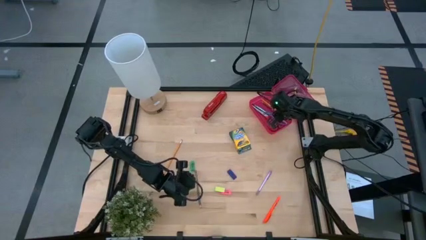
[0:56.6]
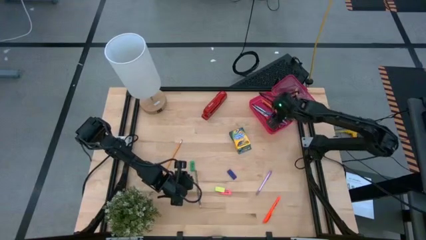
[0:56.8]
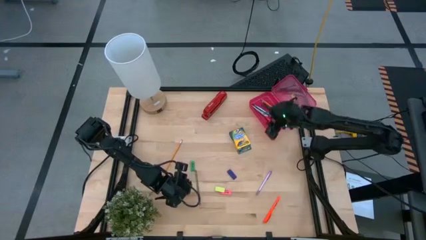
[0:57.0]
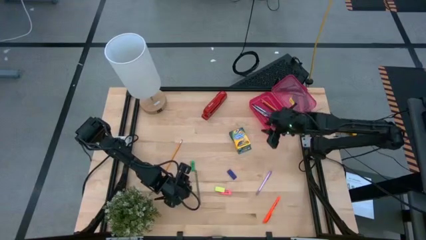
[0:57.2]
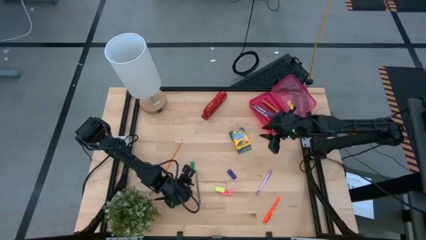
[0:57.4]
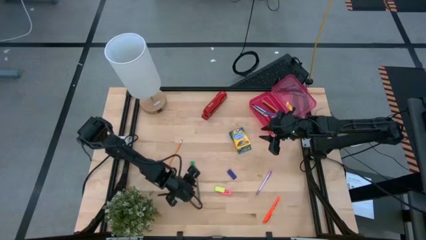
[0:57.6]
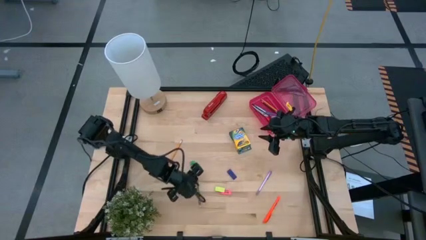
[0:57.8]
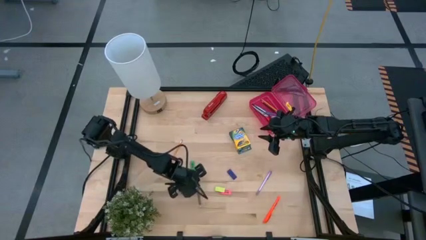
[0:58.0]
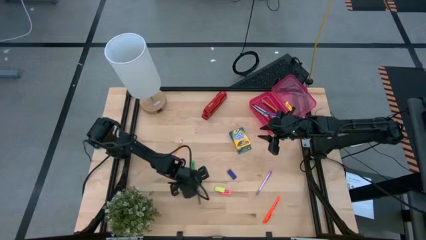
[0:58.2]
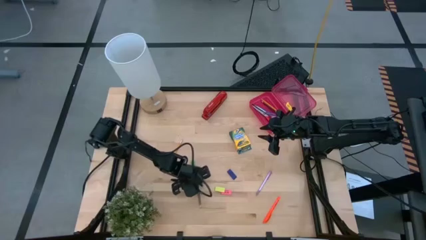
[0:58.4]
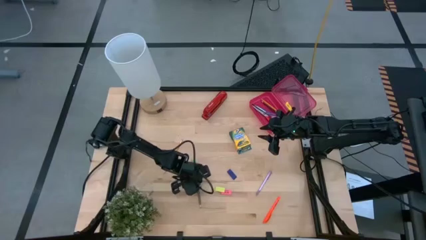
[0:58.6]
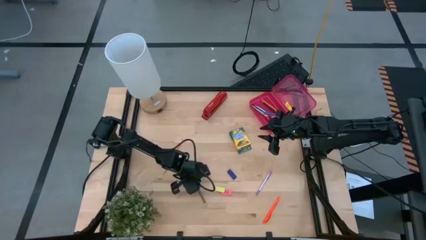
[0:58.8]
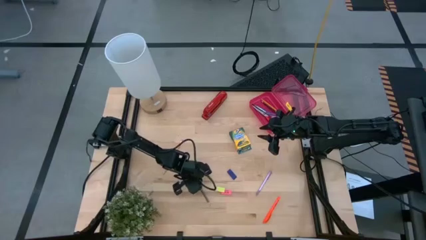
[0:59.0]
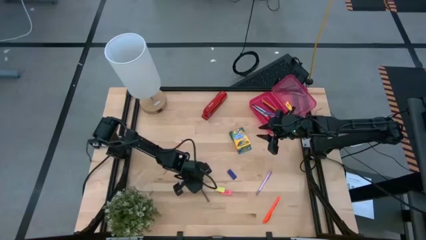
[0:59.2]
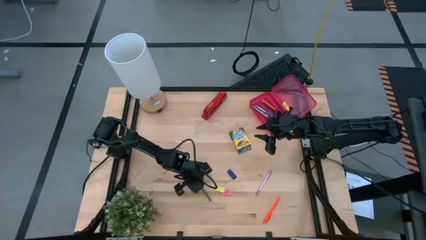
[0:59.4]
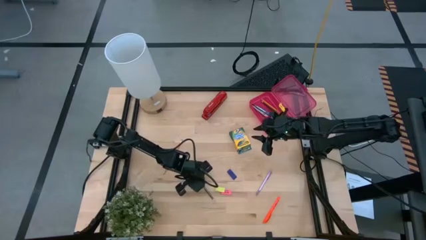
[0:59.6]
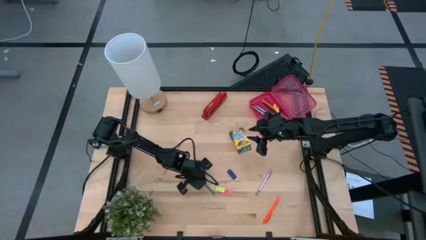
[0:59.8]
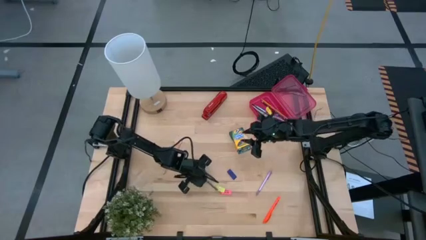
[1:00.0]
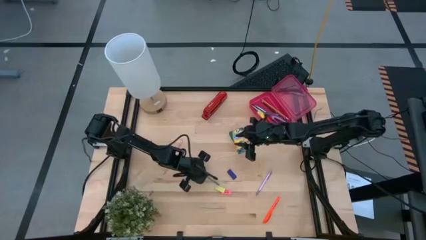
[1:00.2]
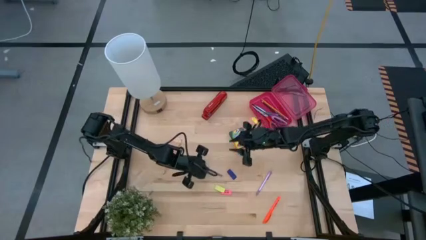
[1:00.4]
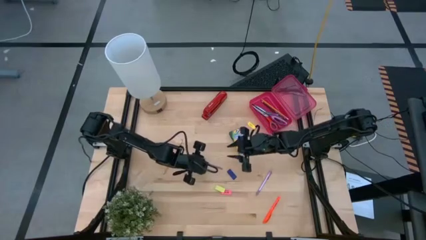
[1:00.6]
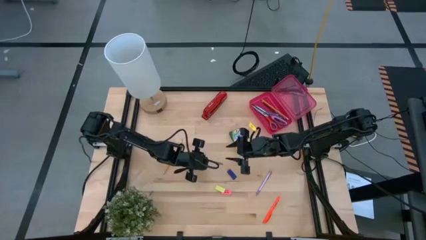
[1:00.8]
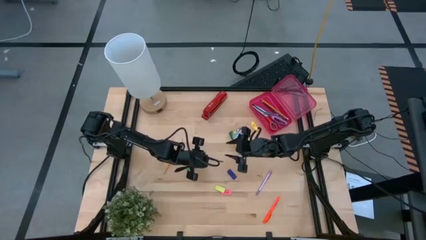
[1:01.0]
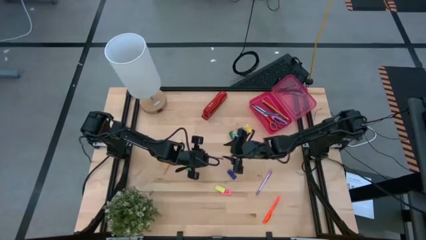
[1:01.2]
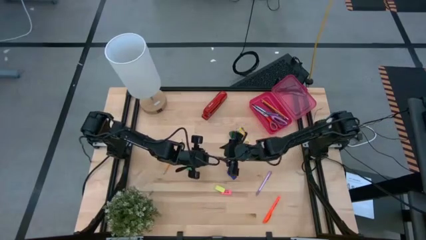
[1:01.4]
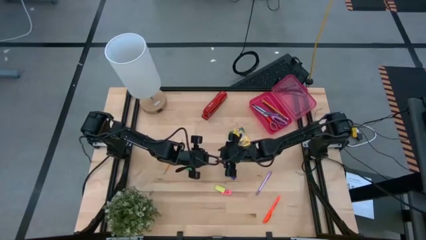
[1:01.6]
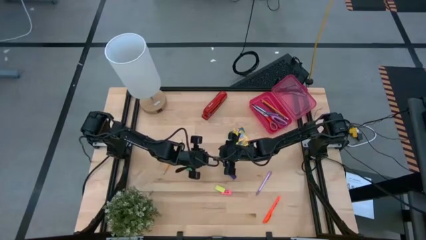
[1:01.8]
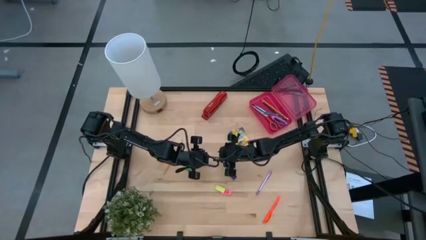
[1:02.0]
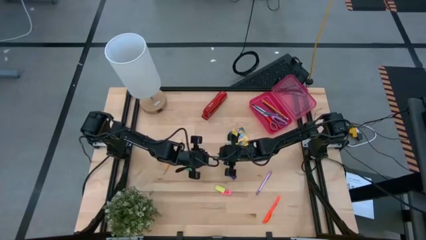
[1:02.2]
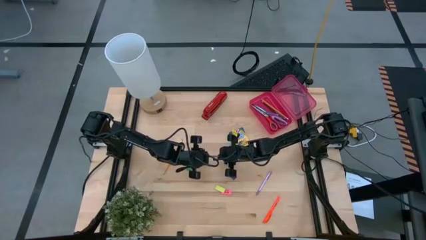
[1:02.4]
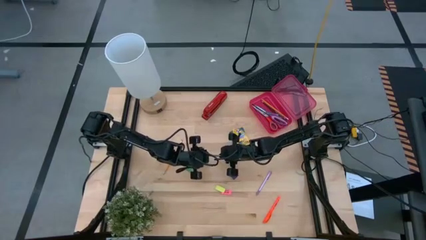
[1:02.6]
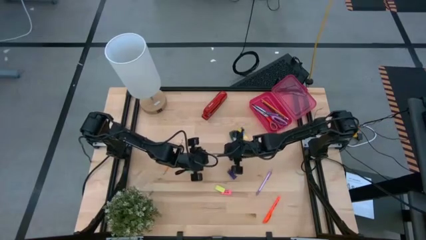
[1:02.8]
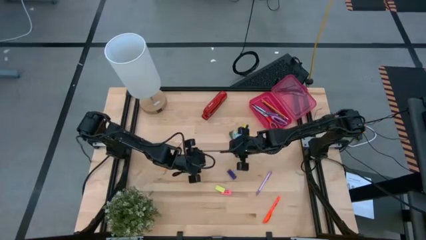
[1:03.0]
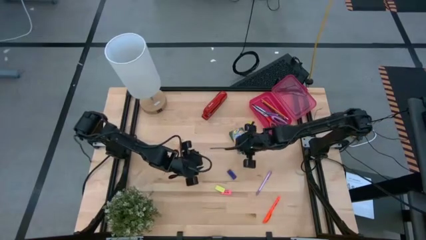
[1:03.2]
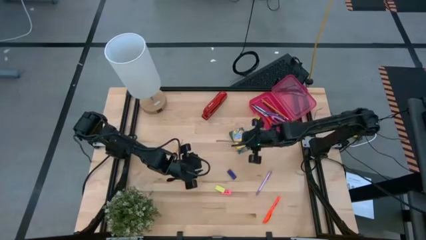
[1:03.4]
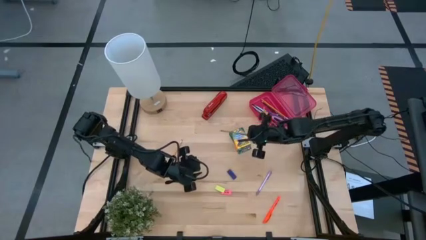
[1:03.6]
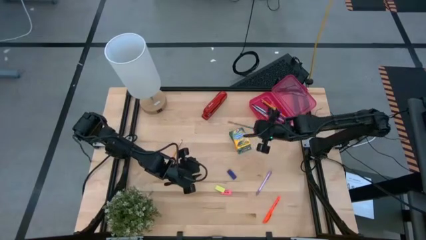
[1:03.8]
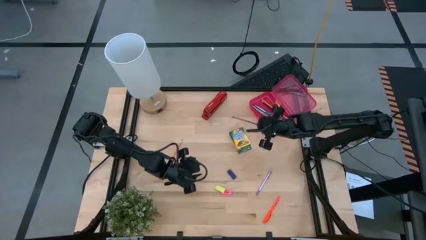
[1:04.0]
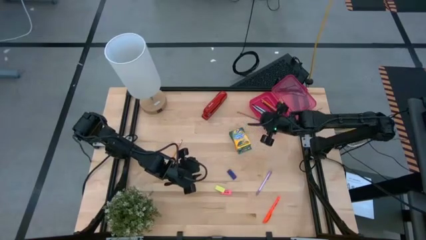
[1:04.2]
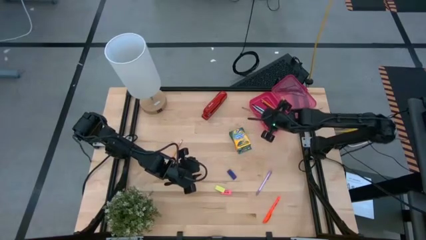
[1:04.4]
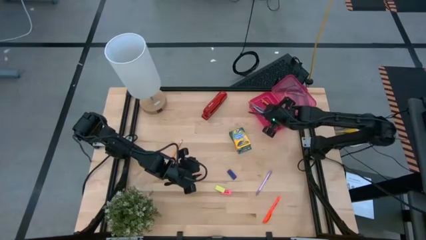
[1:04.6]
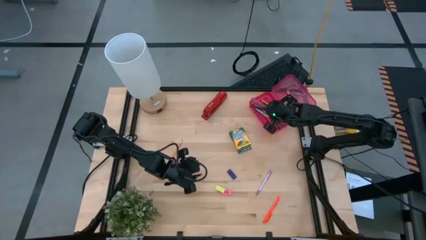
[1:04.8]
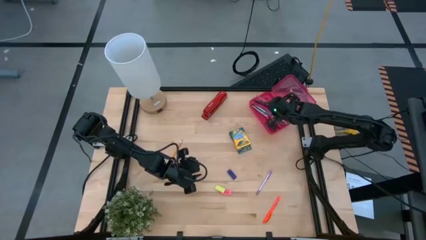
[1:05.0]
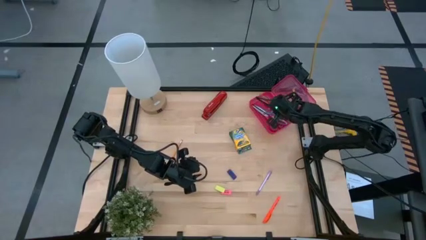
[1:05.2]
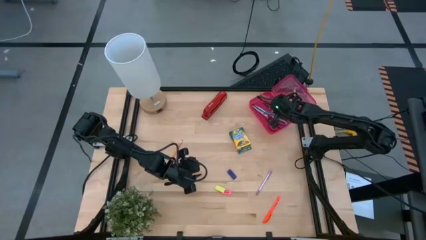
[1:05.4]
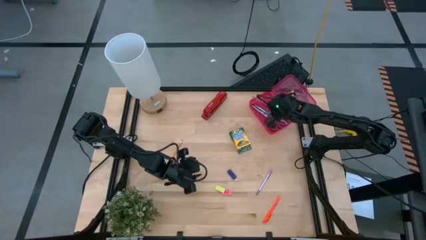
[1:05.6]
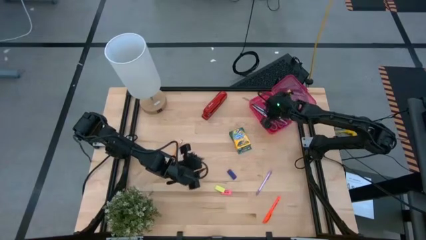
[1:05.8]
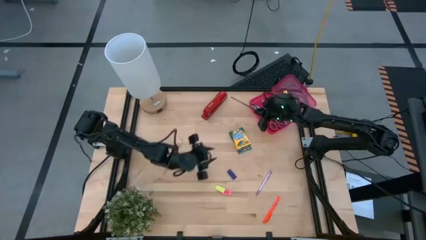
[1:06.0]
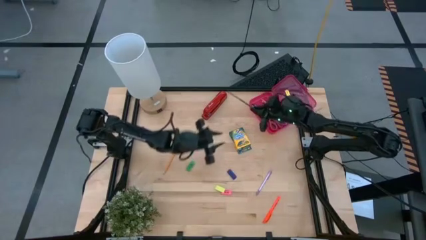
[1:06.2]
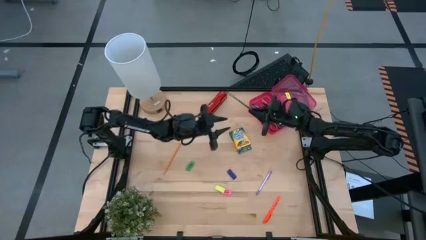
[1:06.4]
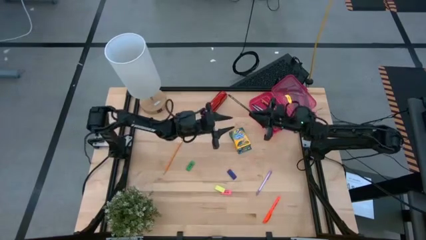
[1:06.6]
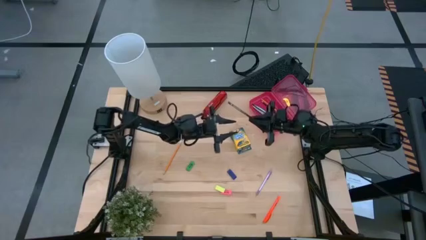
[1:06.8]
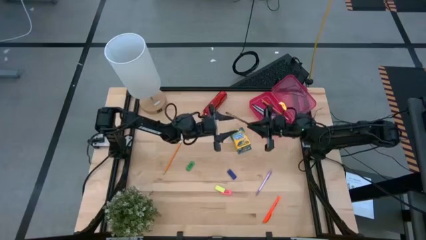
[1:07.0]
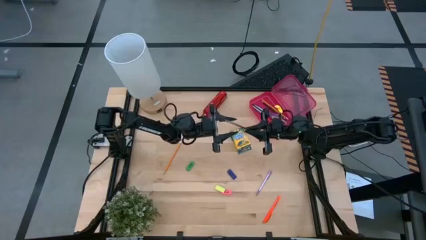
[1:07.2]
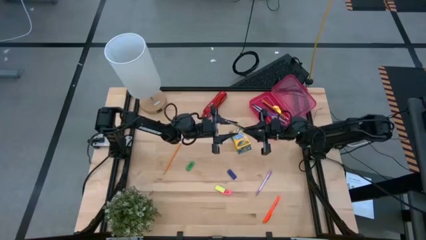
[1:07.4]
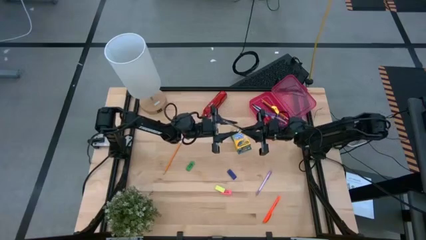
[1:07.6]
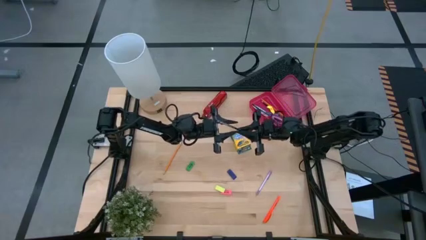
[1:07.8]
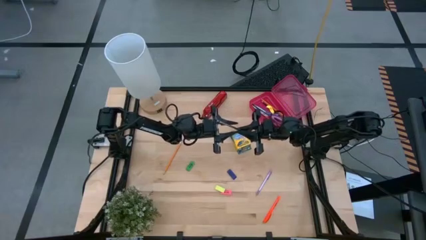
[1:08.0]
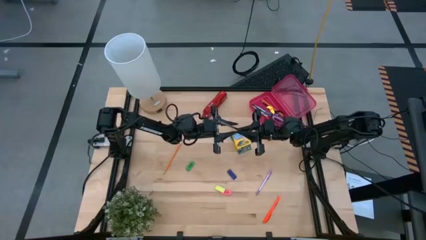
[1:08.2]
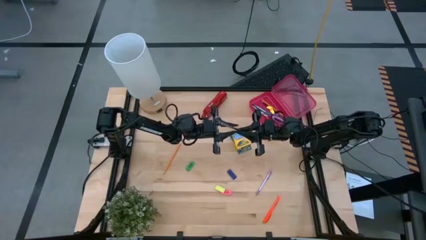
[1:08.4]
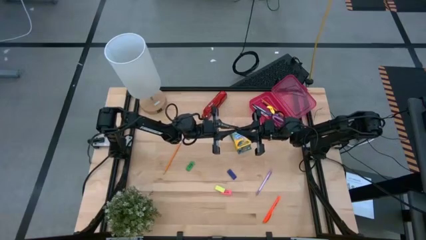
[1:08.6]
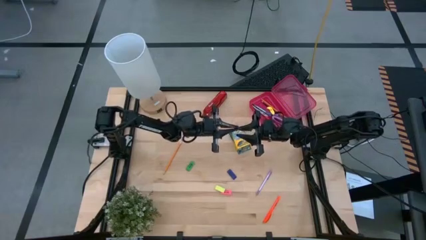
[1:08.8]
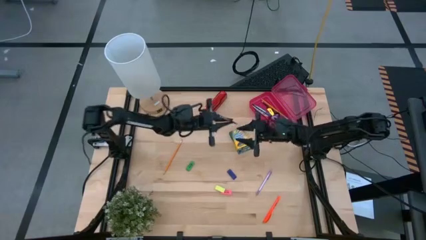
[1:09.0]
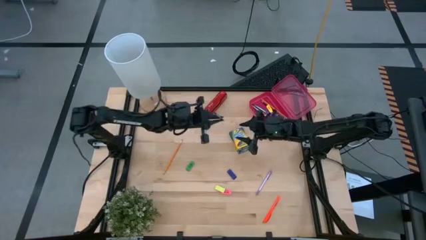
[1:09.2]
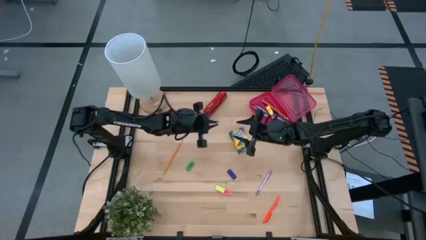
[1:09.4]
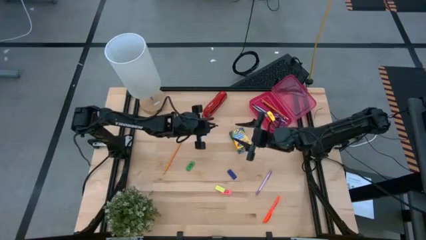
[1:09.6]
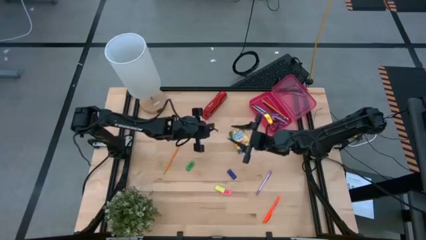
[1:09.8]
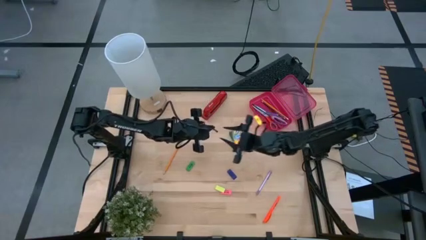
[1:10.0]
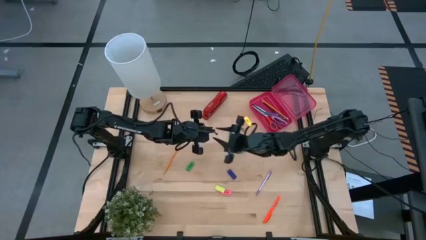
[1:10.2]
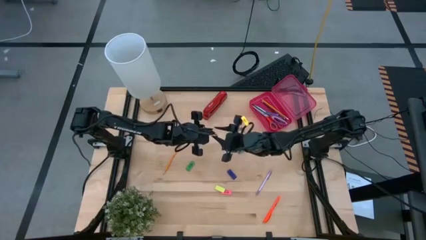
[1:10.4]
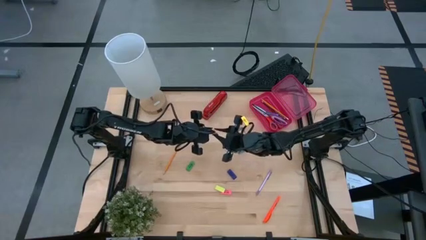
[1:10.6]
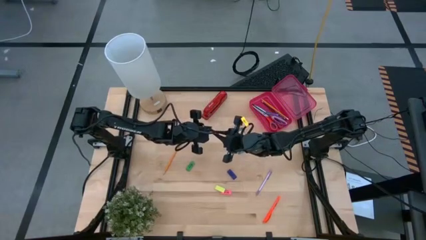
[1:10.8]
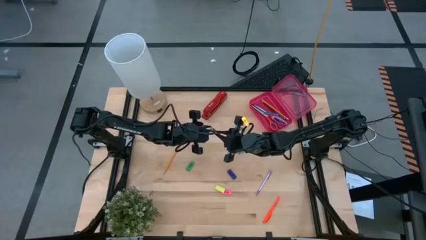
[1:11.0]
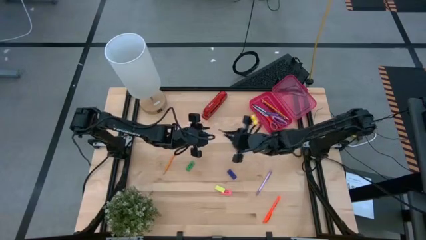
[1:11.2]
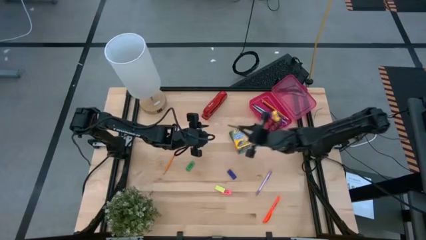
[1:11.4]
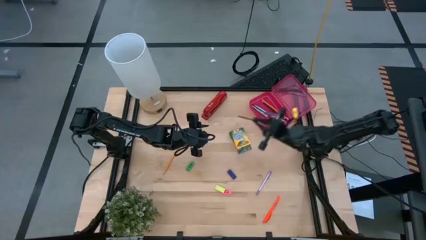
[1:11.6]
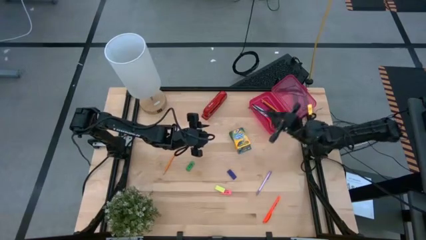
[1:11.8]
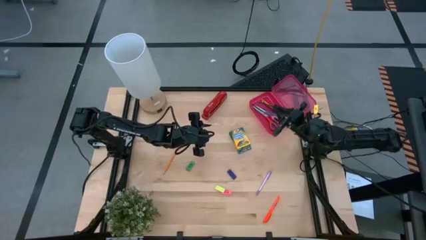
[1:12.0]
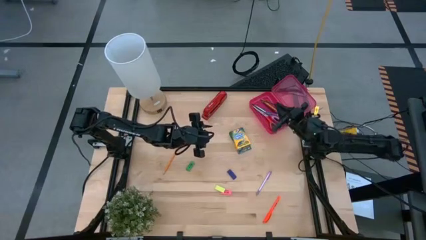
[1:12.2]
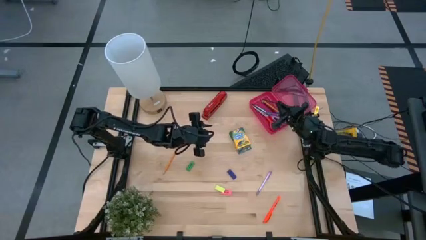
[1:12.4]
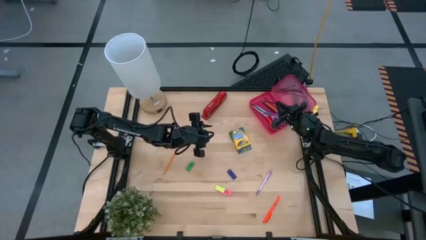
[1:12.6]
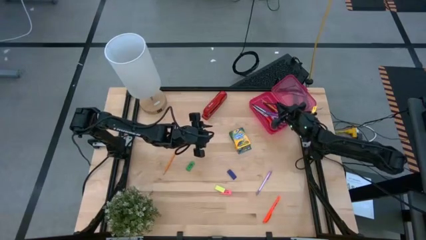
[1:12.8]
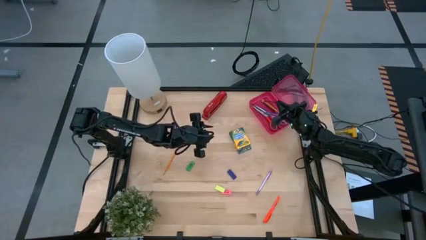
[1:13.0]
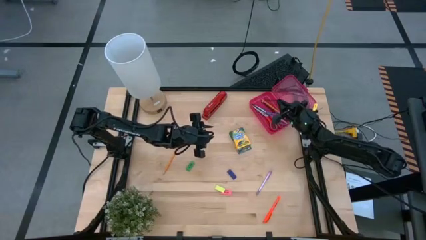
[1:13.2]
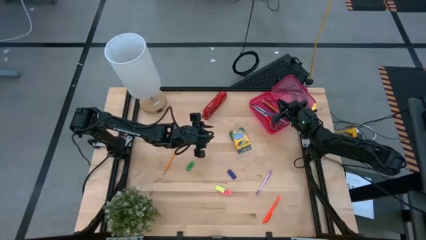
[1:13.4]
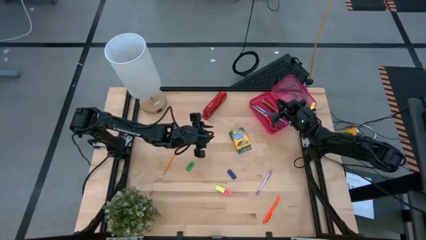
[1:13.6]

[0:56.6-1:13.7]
Task: Pack school essentials
Put the black pencil into the pink supply box
